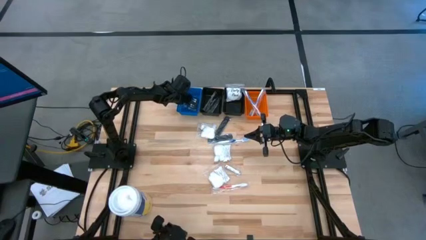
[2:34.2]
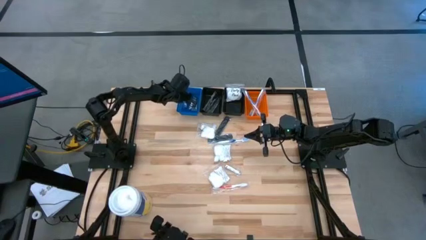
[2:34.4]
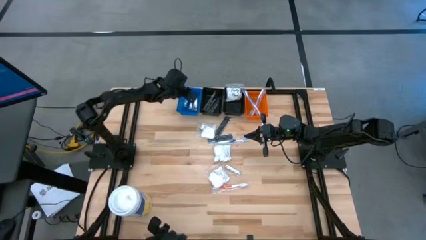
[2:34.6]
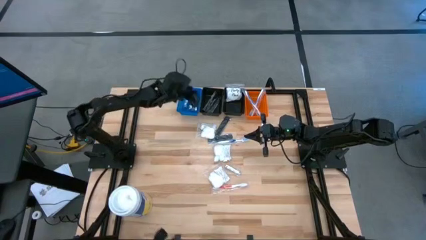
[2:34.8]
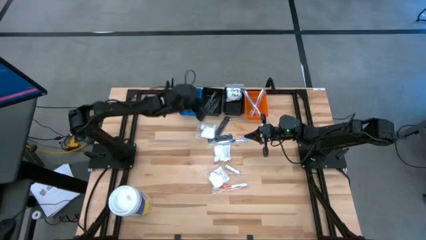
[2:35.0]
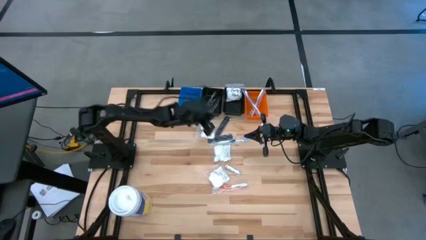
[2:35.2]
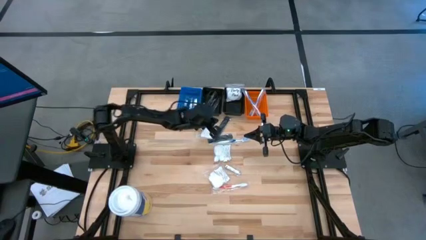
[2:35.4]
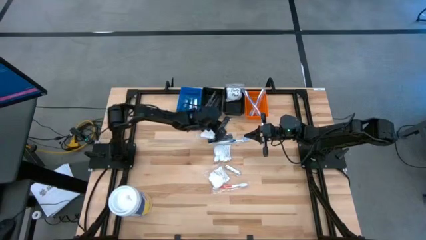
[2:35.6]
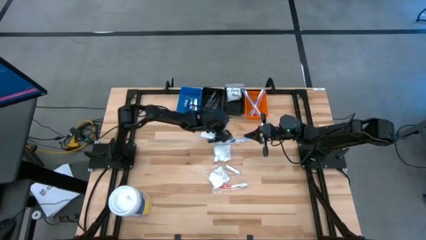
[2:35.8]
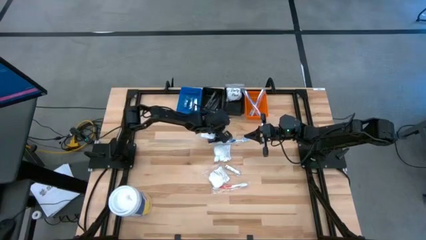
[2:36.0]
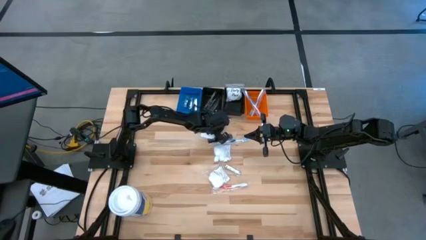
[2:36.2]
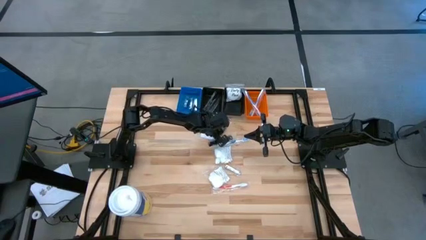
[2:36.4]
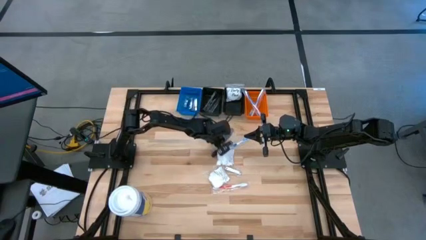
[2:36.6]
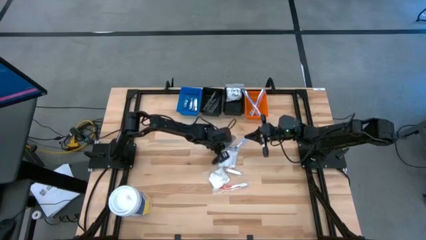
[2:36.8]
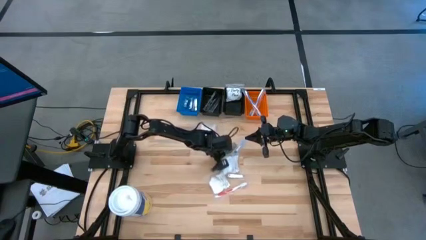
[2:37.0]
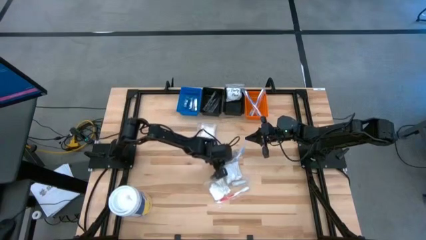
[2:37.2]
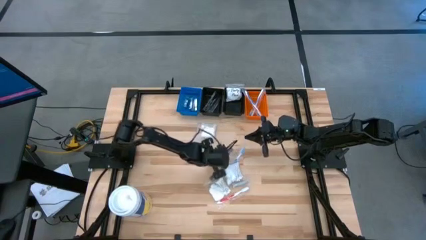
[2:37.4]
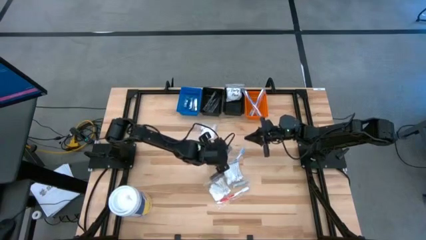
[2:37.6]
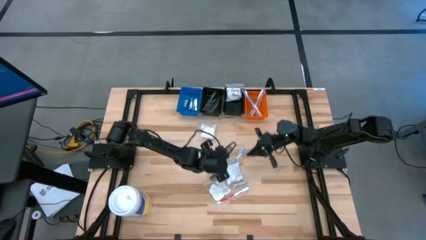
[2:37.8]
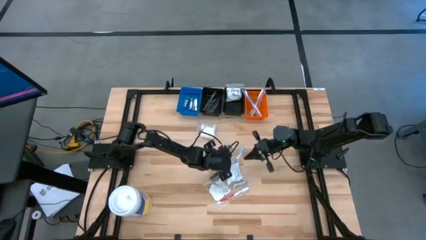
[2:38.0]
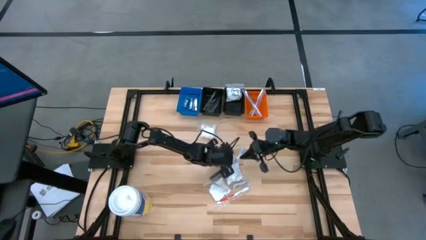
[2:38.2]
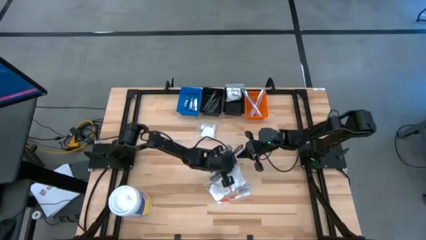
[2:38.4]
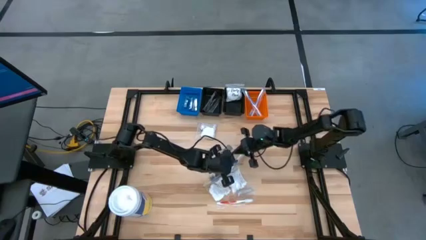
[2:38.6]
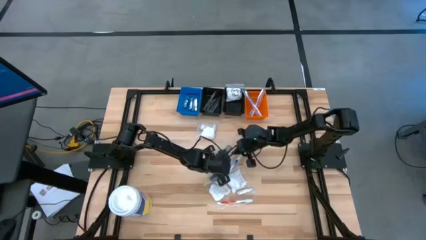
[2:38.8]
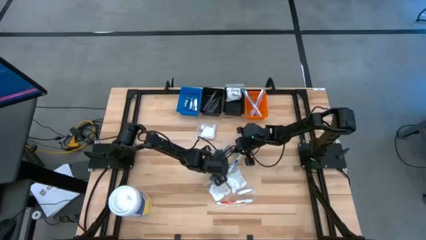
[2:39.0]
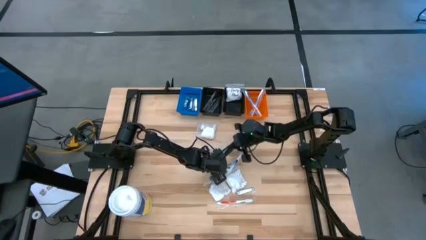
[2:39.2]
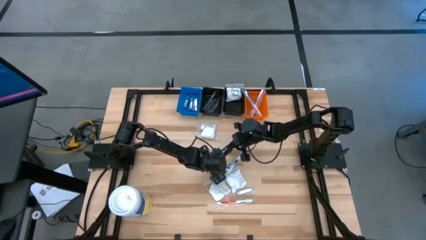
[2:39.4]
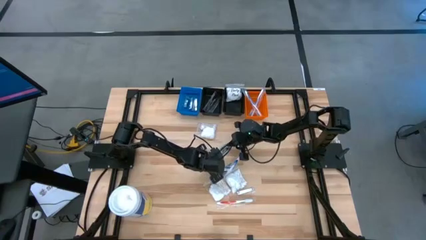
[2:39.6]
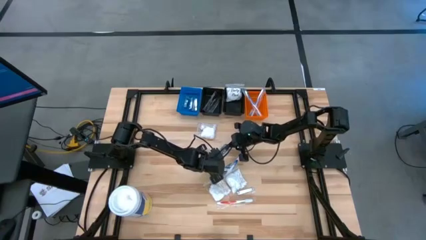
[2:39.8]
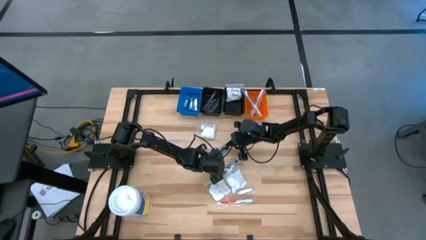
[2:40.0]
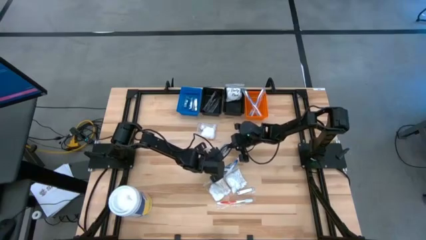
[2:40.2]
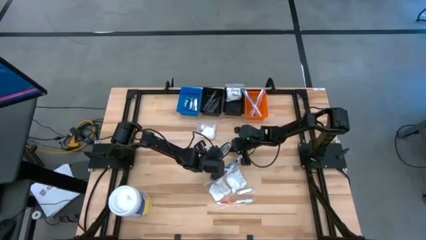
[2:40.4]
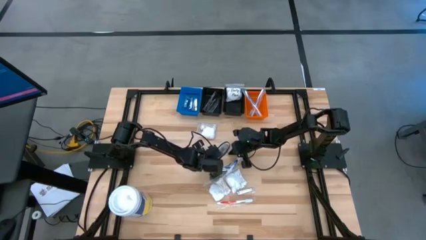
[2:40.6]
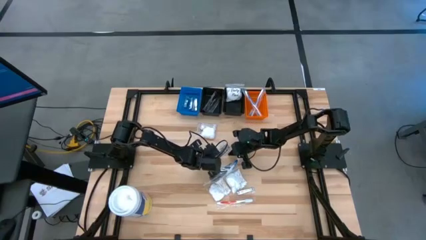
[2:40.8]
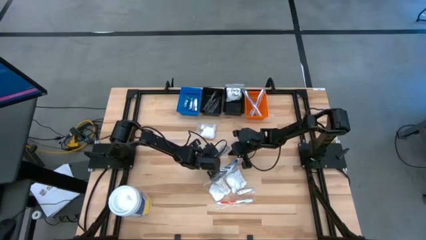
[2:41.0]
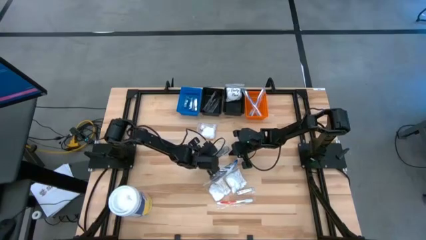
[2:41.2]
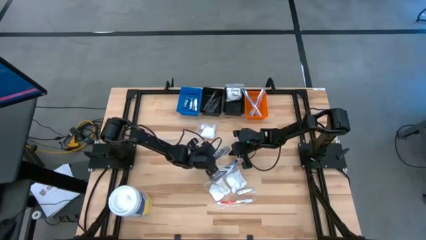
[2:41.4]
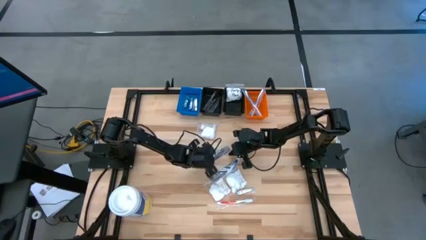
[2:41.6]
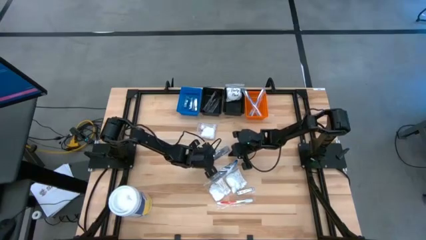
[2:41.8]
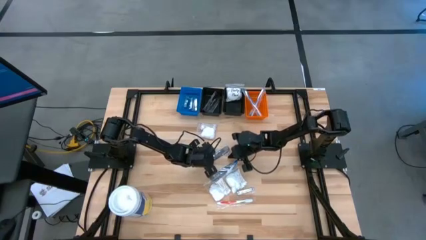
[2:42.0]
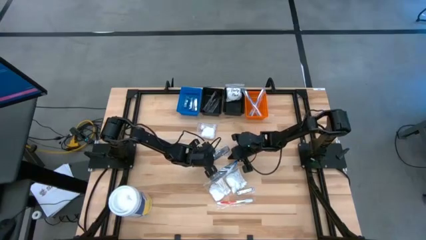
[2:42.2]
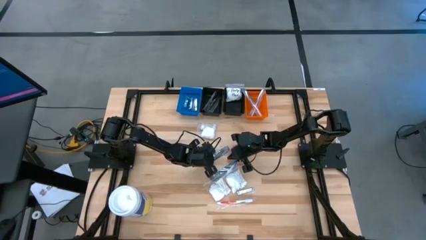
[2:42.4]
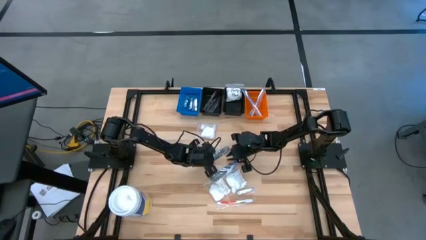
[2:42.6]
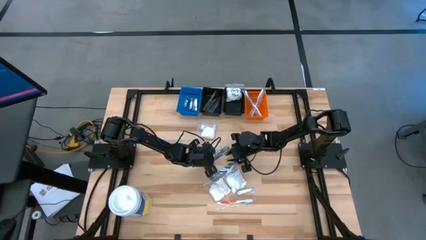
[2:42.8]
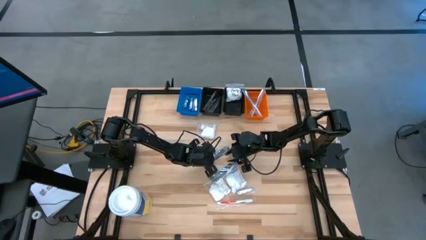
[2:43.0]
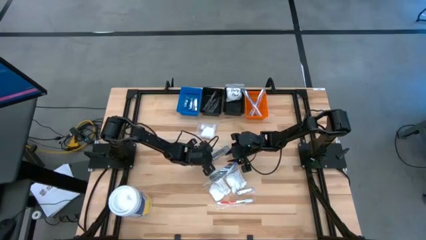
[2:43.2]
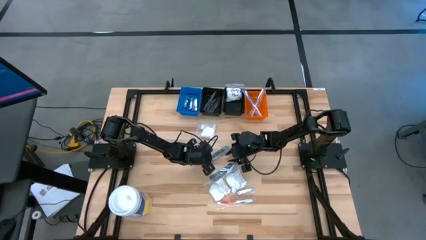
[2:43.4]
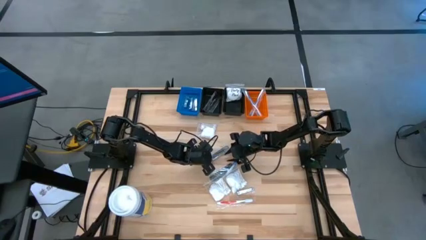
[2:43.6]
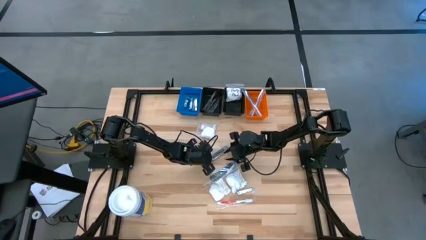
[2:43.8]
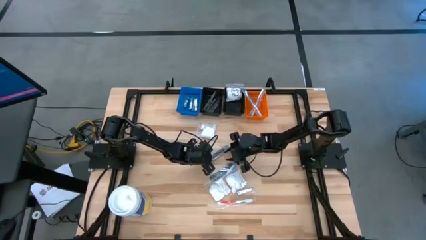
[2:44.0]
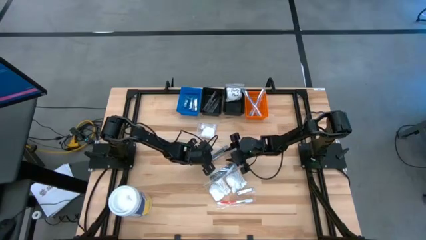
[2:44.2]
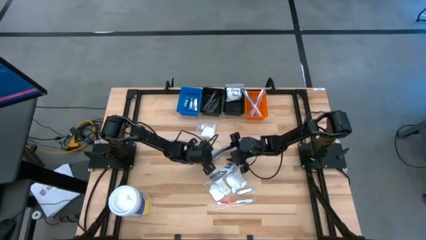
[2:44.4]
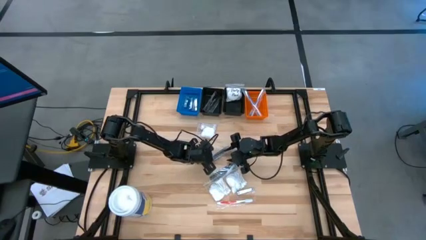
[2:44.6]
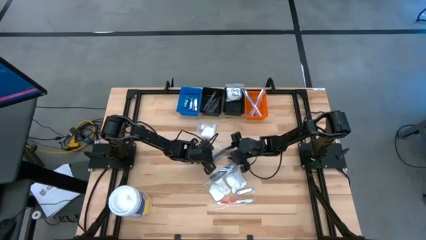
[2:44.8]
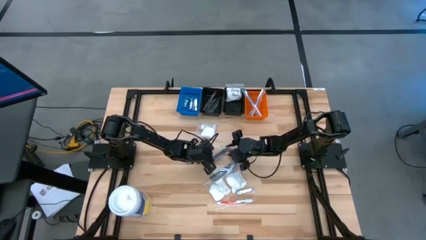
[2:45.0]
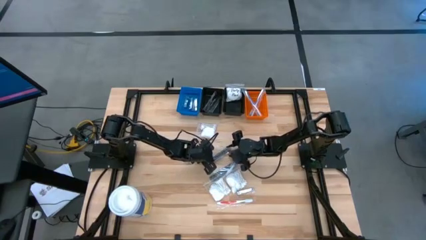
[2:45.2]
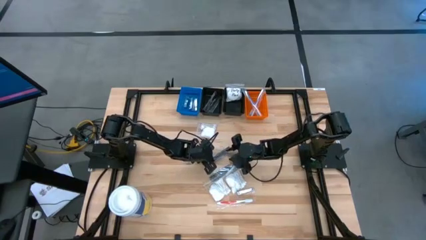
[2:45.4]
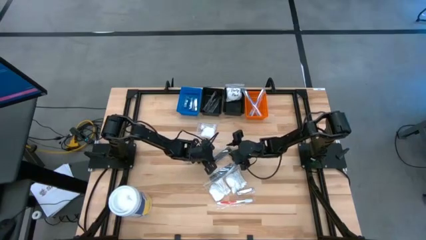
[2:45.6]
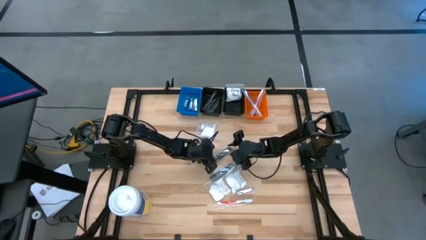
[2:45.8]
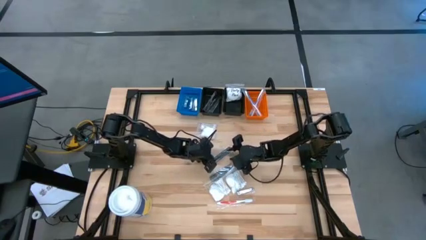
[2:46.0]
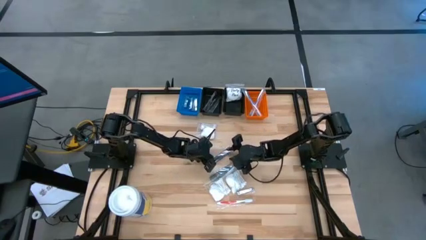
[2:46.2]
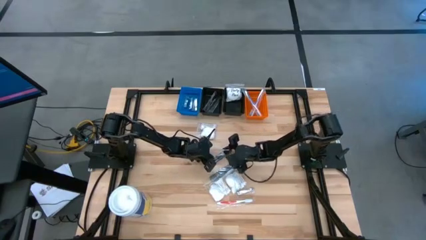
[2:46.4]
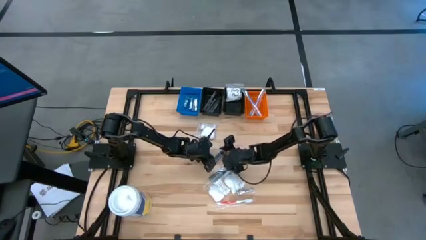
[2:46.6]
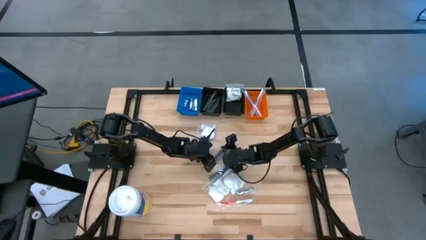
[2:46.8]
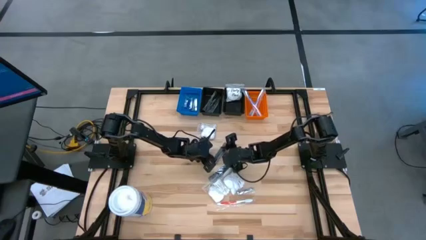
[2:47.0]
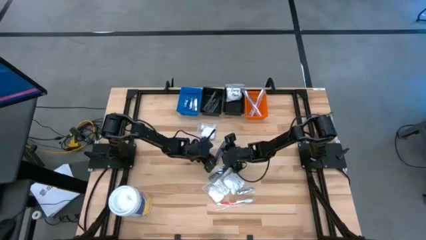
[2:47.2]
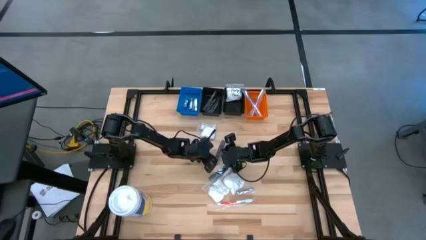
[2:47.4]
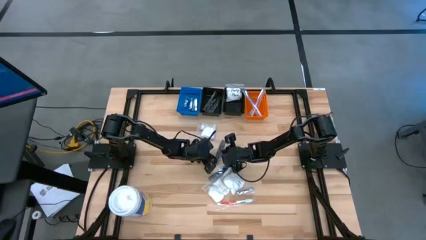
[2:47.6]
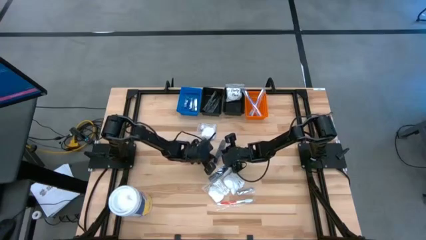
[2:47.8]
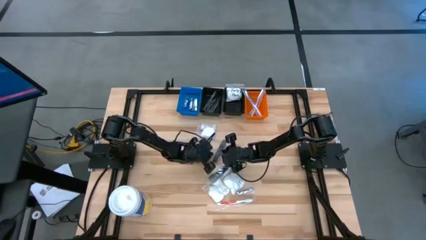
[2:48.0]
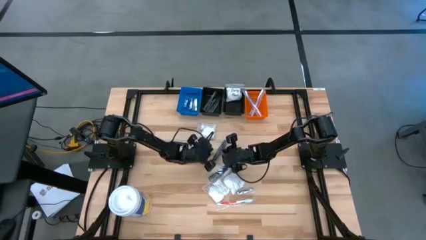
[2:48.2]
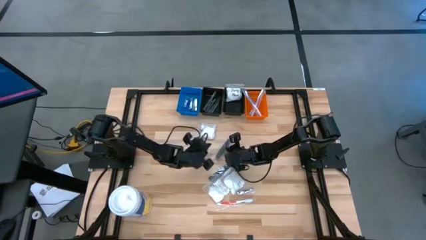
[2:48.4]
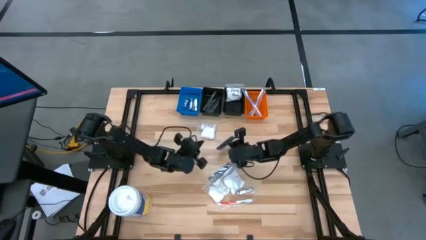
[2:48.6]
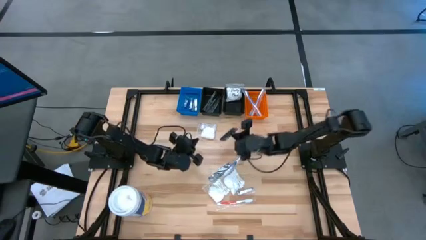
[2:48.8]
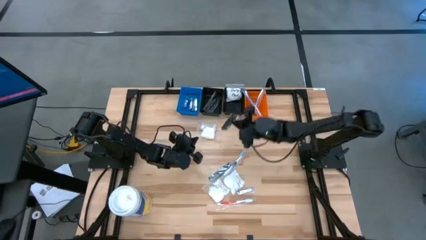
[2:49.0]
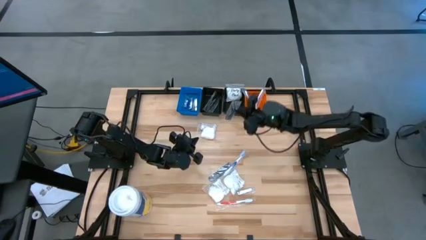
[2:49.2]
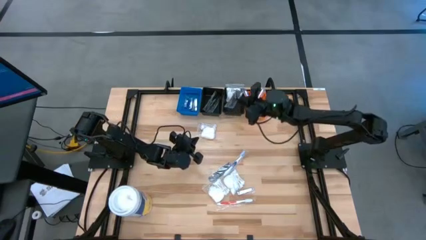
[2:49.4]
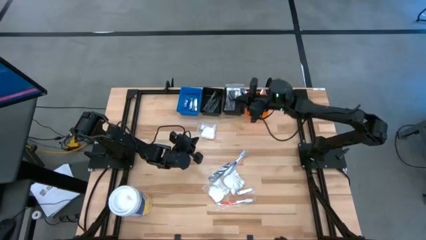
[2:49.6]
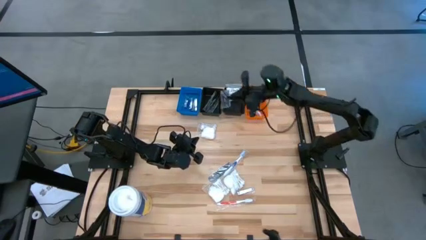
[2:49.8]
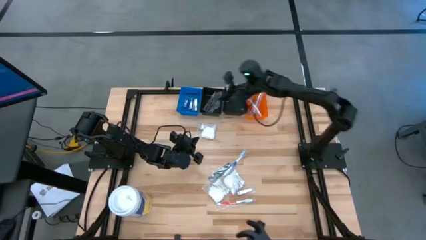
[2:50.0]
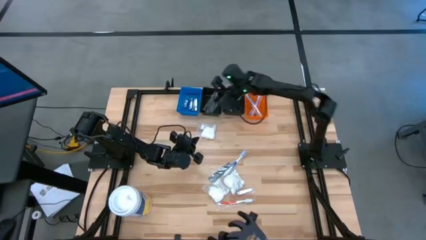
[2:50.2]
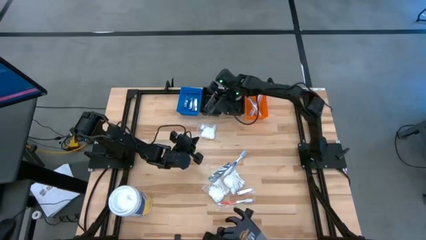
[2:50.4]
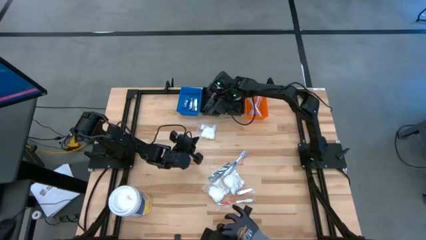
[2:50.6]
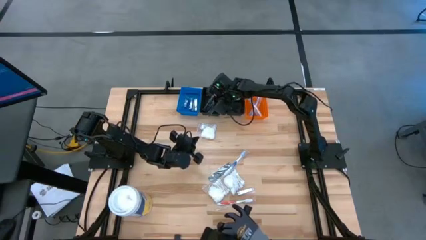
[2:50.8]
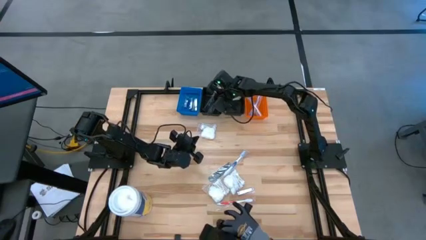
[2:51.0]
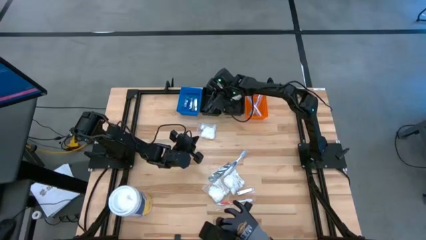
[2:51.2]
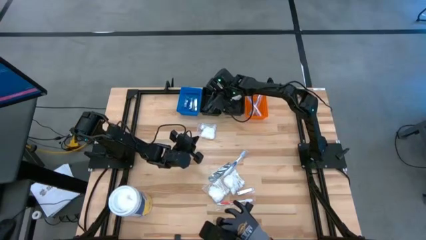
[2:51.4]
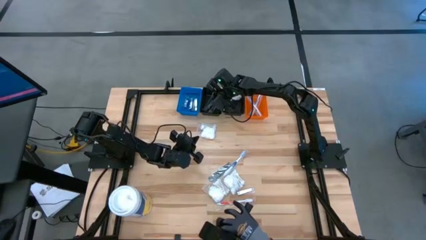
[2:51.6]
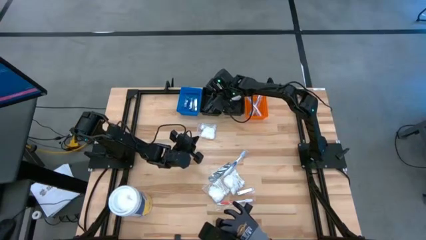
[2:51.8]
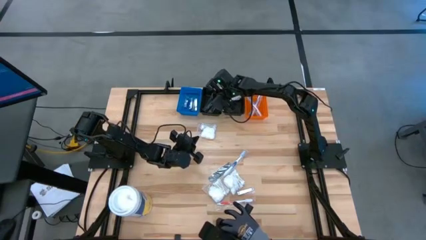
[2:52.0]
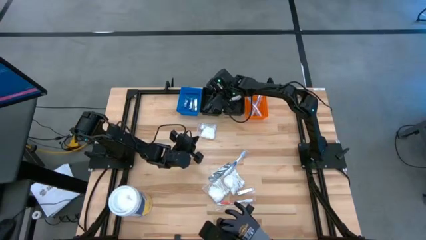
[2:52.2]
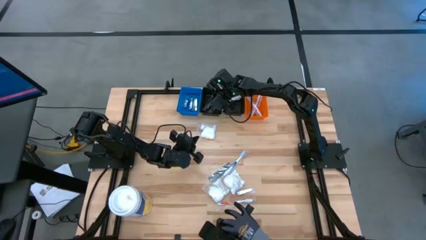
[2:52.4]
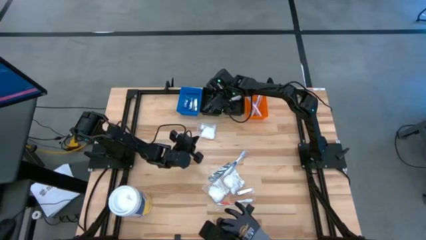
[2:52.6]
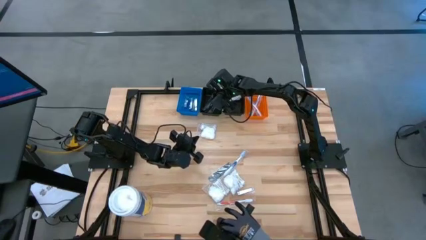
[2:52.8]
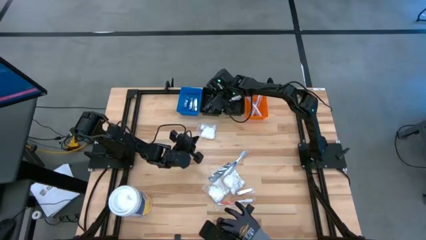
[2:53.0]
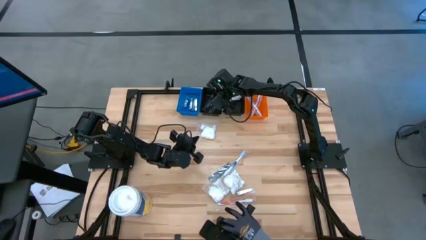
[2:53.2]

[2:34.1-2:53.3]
Task: Pick & Place Travel size toiletries
Put the black comb into the left black bin
